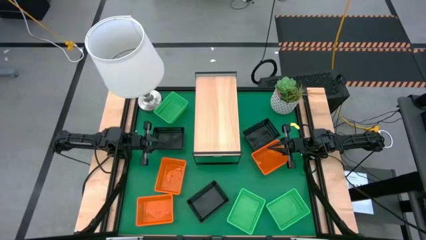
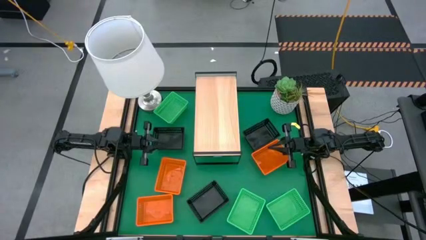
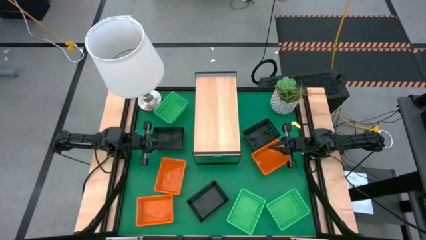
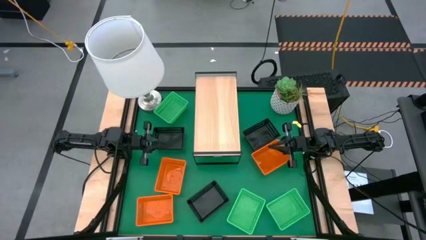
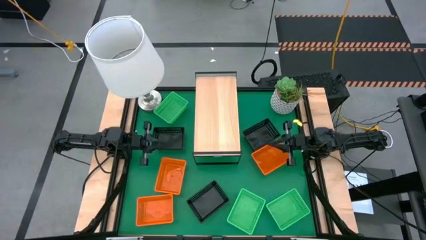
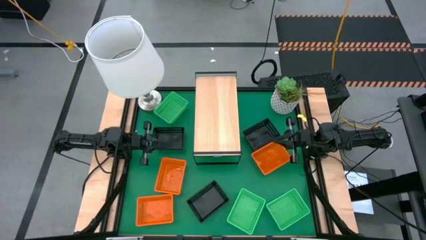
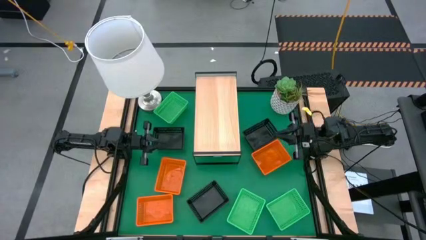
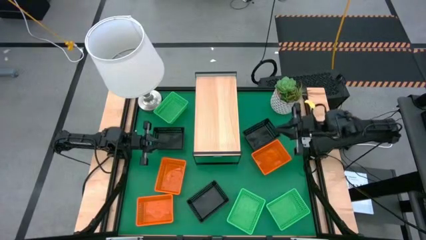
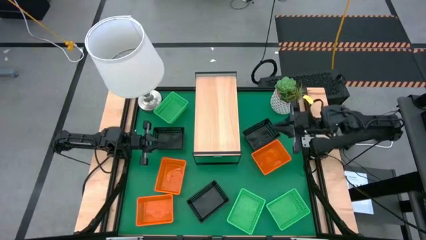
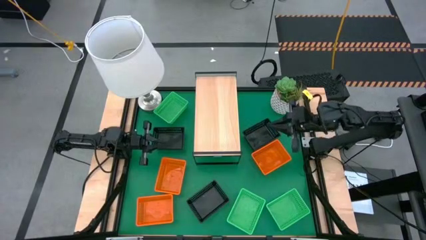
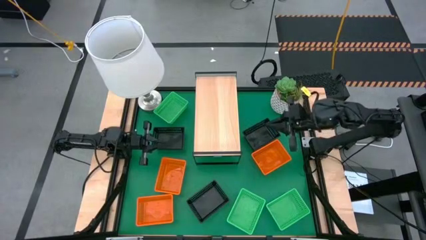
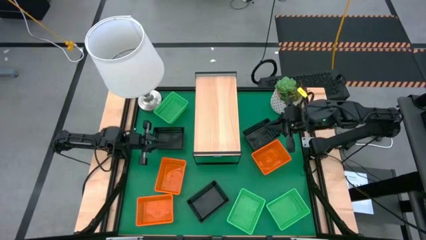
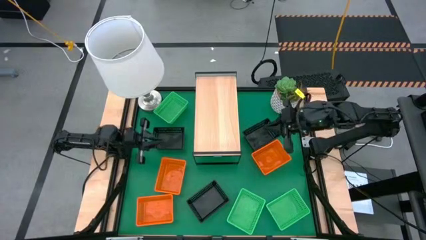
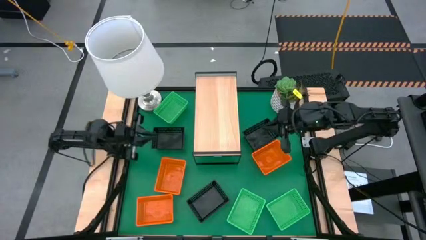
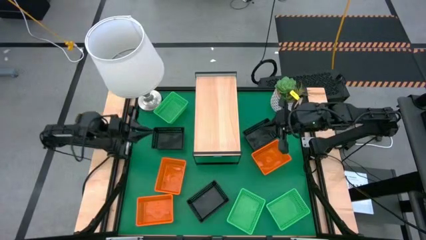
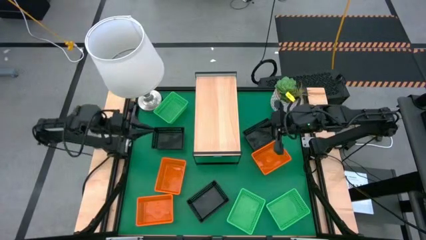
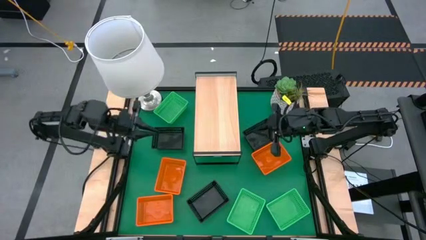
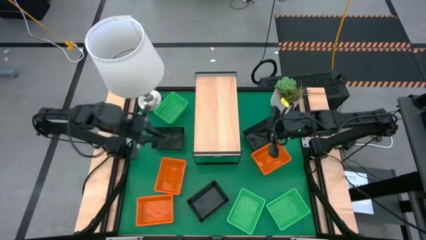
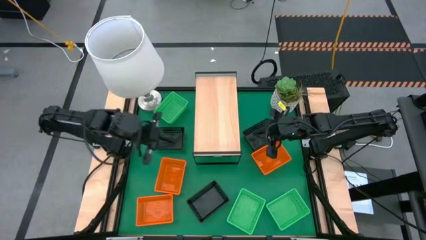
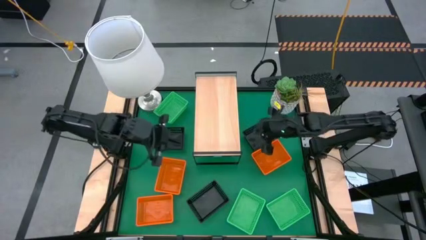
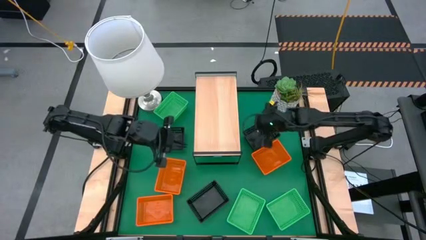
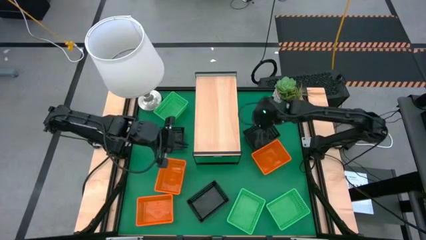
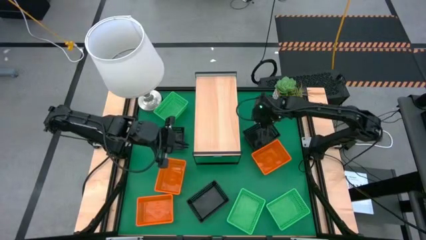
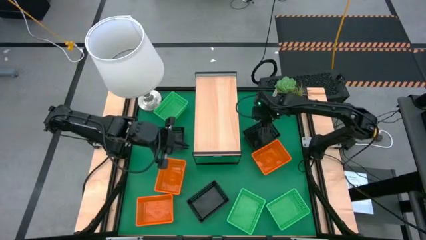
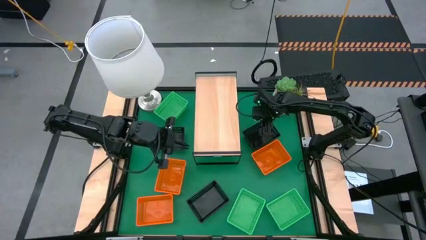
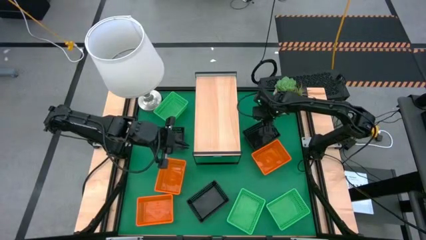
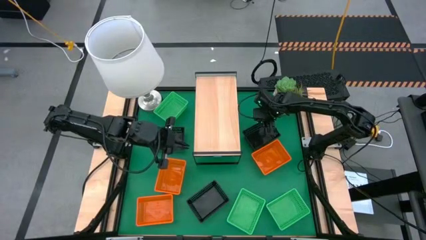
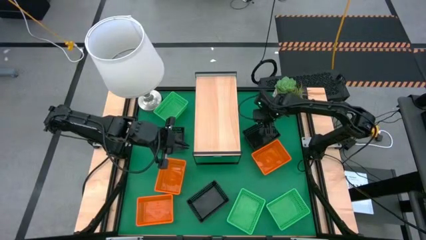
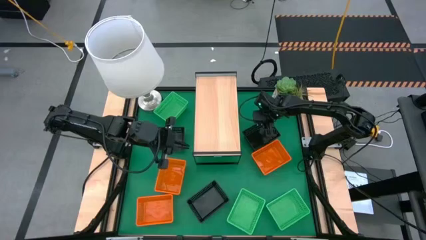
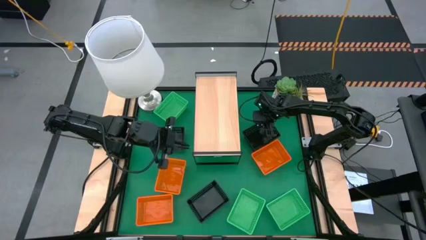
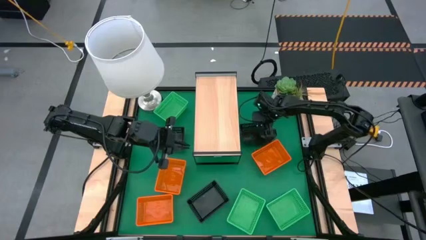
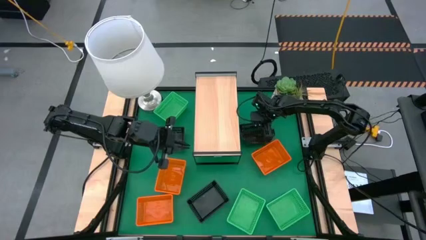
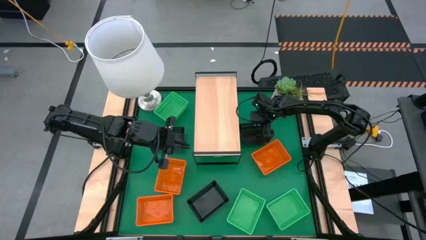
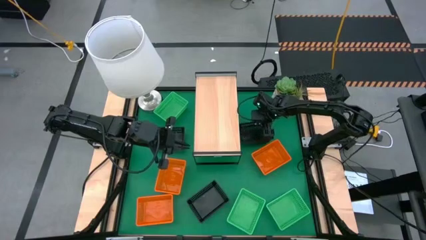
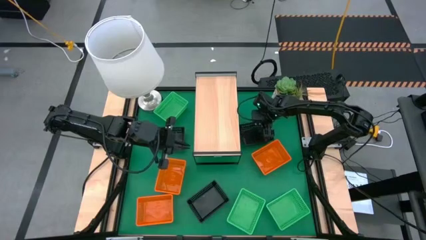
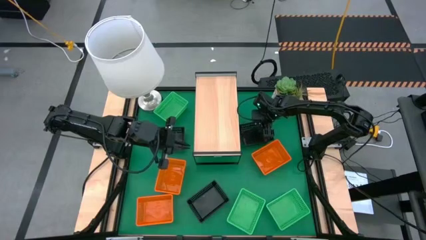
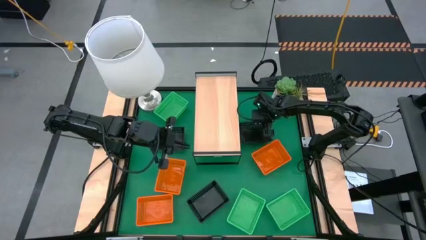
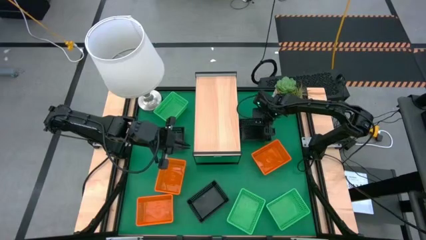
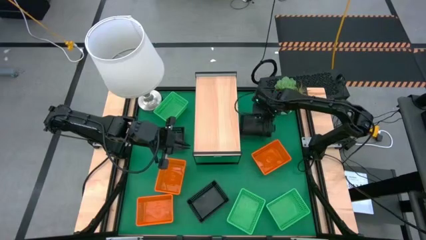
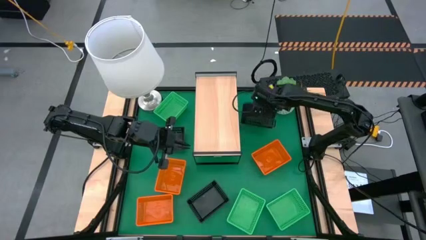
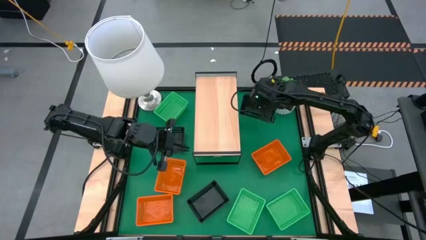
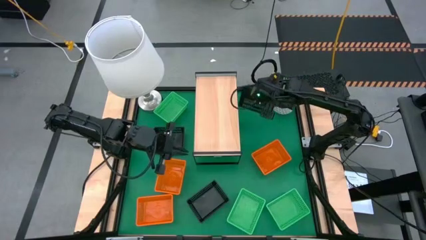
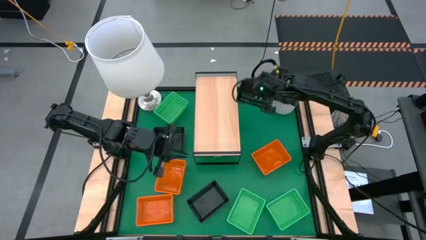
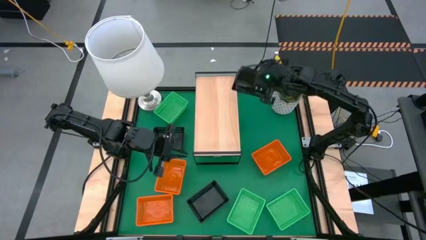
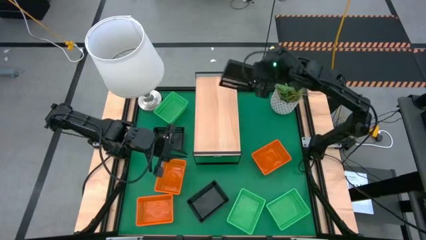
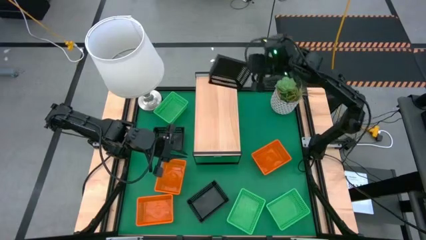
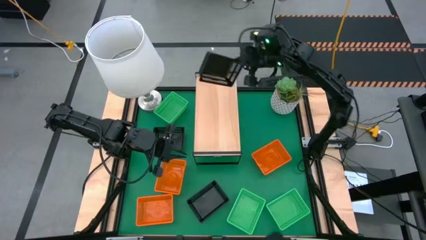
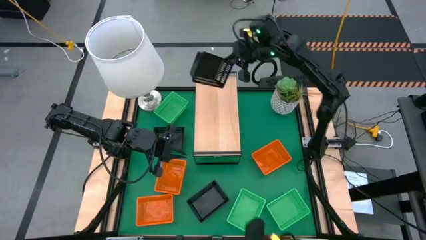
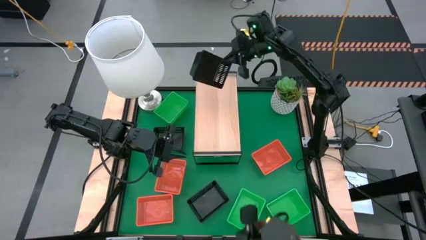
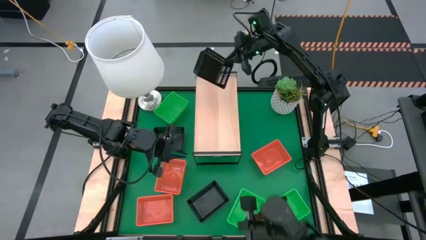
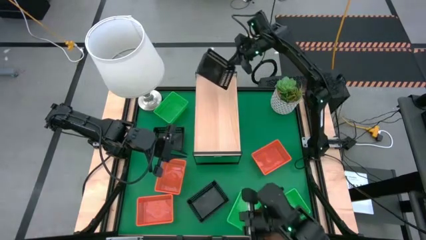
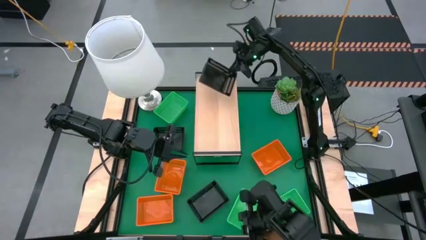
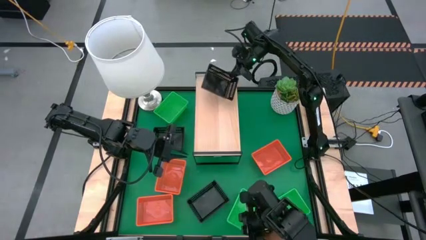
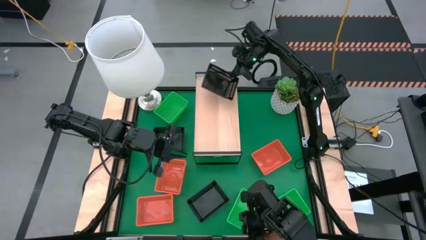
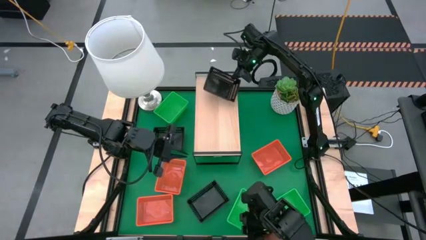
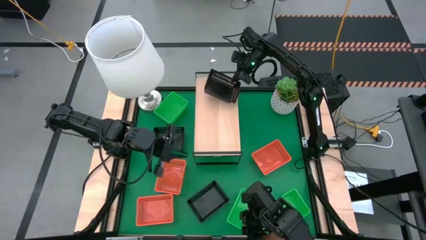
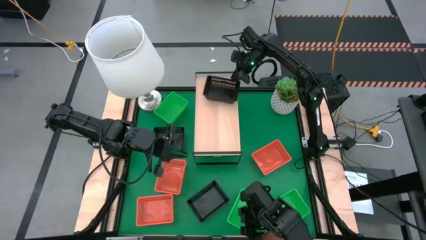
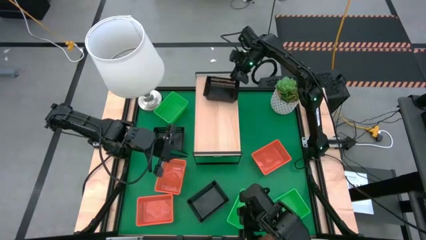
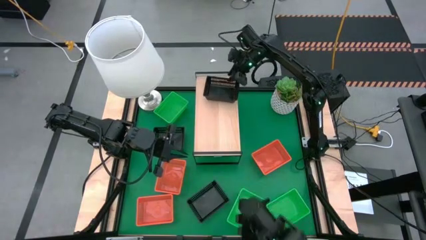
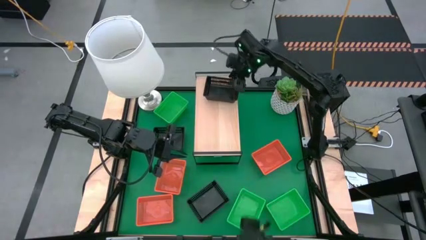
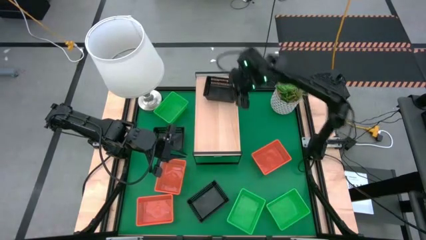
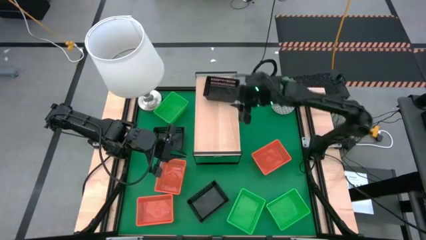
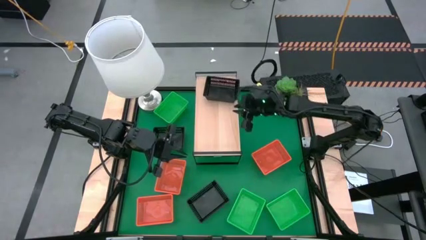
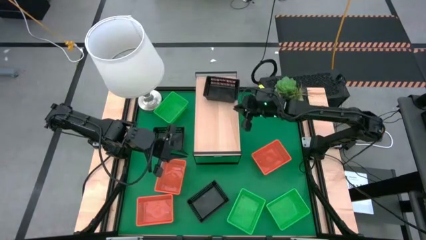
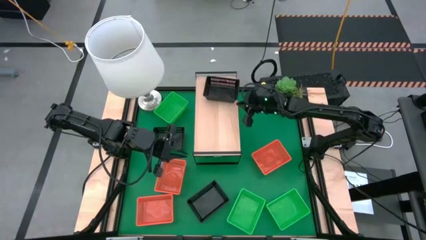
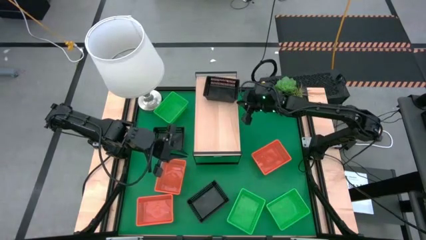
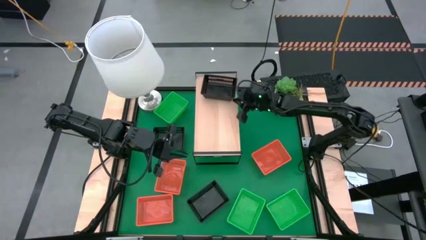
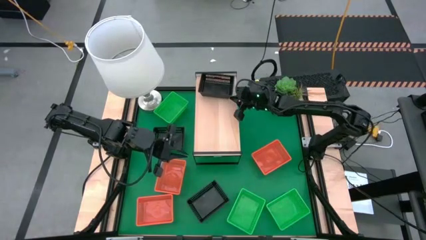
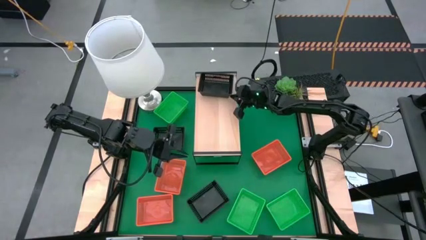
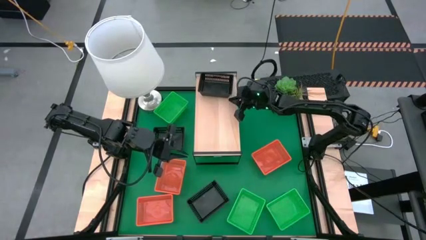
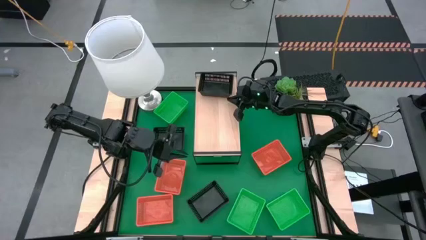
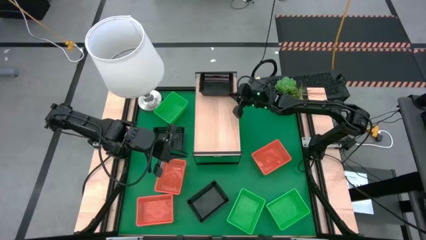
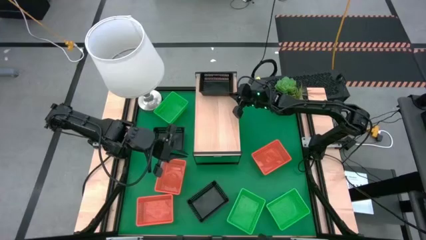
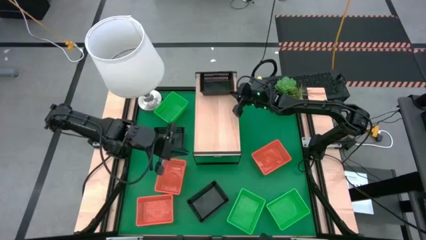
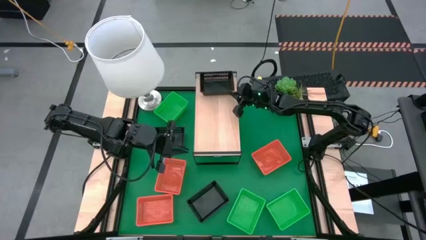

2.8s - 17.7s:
Task: Stack baskets on shelf by color
Put the top right black bin on the shelf
